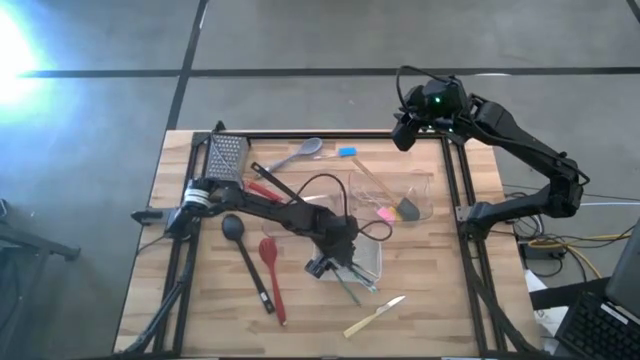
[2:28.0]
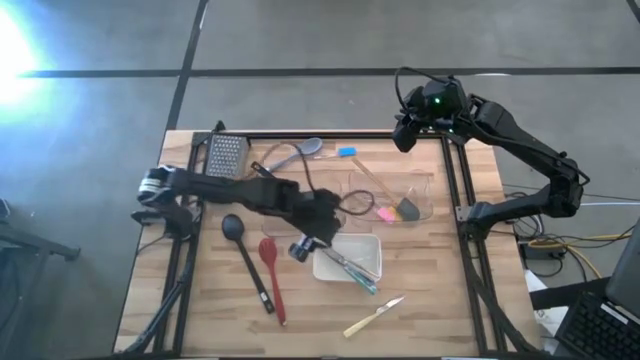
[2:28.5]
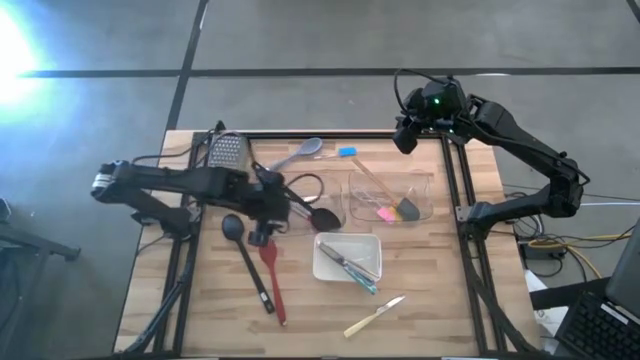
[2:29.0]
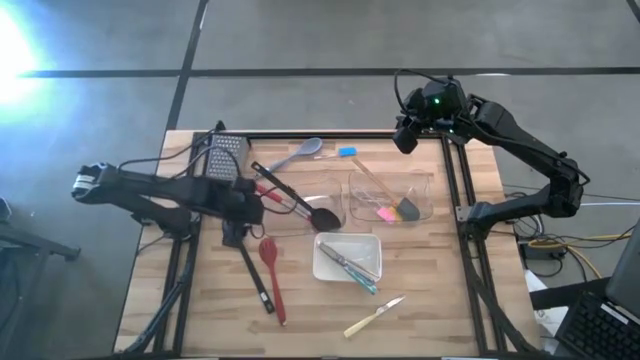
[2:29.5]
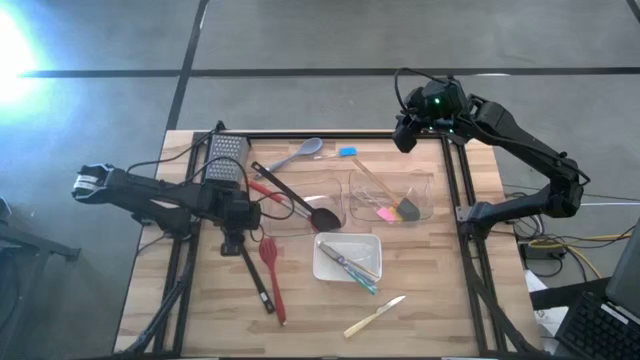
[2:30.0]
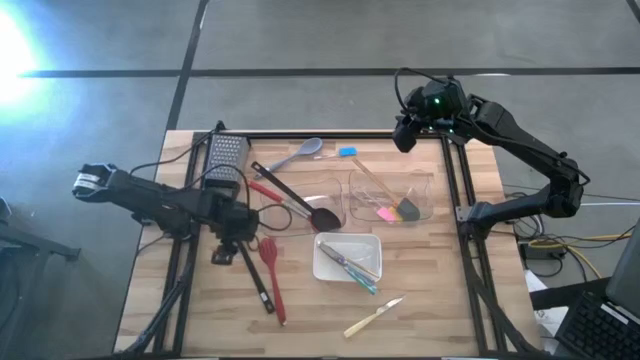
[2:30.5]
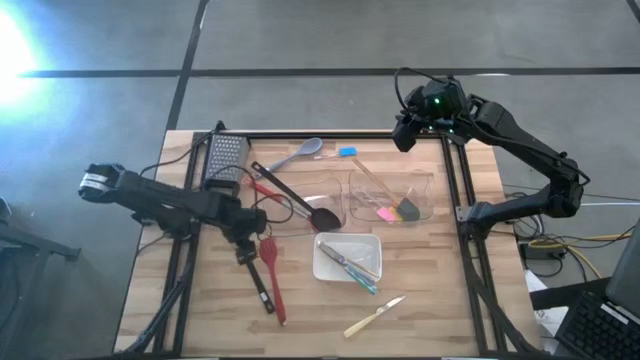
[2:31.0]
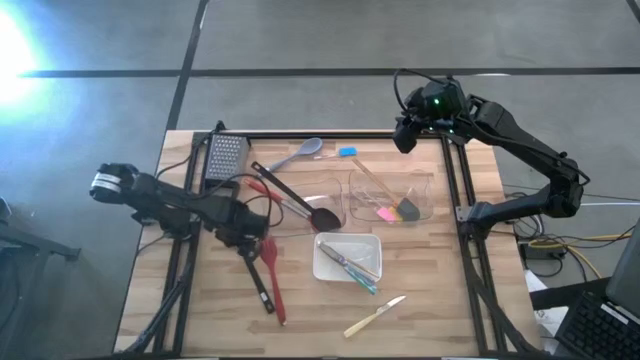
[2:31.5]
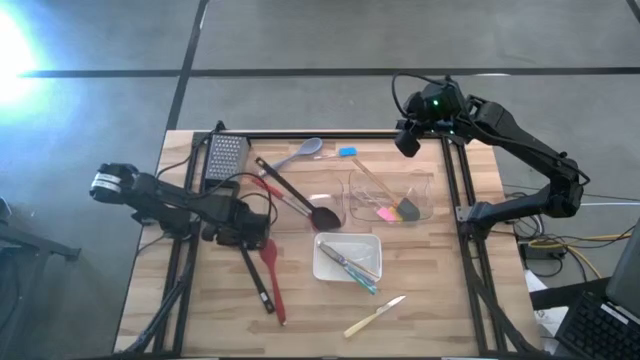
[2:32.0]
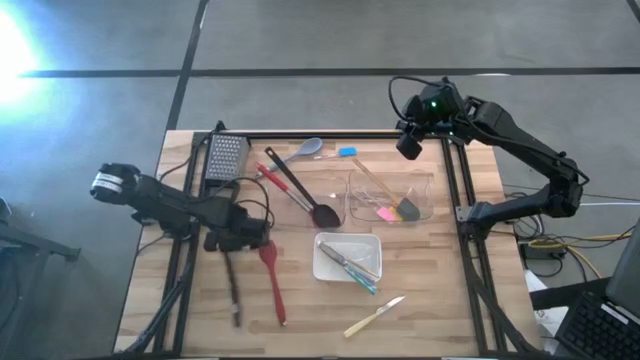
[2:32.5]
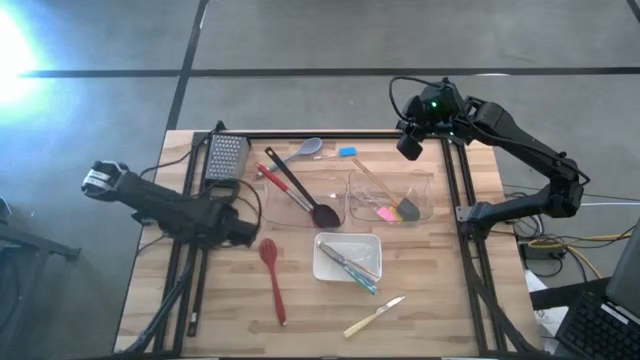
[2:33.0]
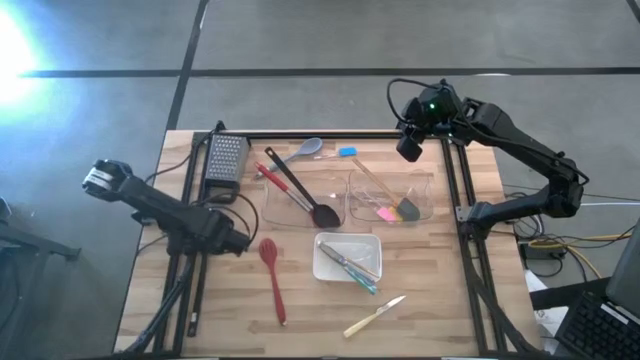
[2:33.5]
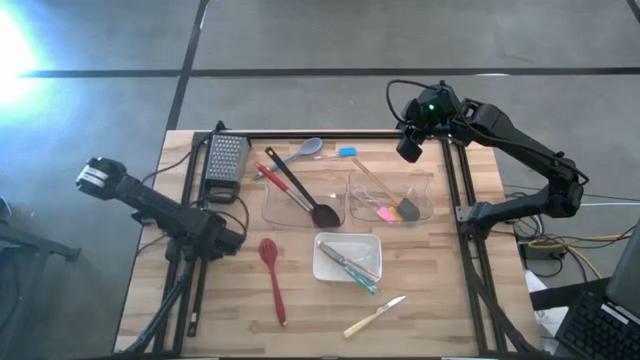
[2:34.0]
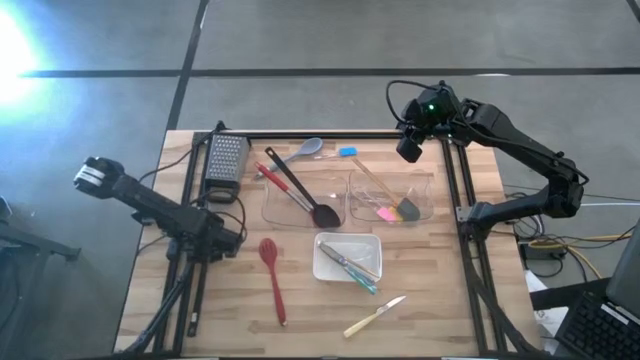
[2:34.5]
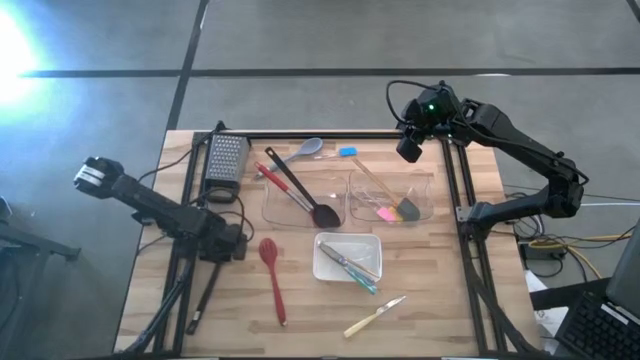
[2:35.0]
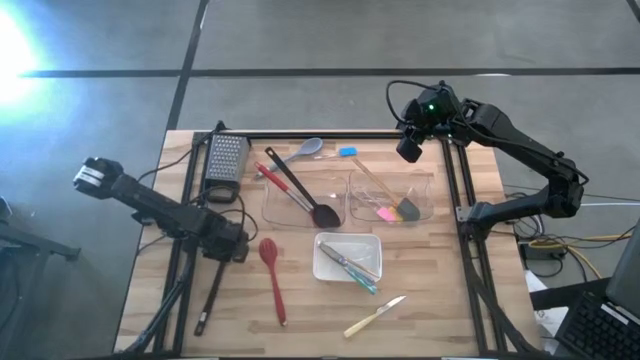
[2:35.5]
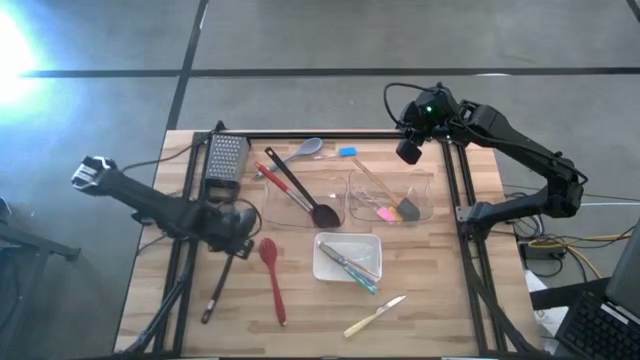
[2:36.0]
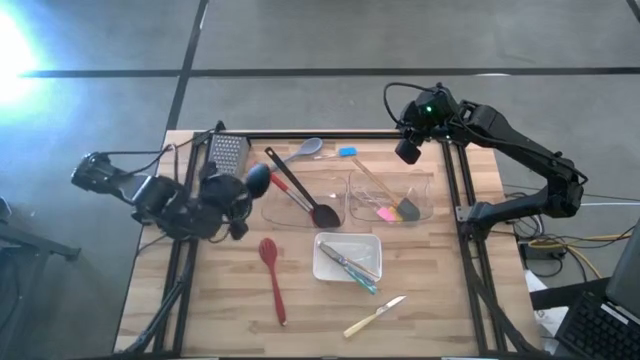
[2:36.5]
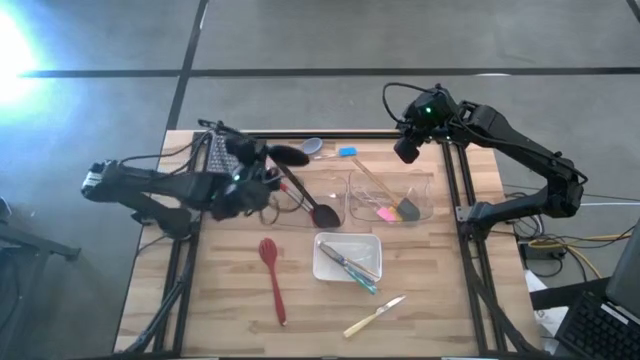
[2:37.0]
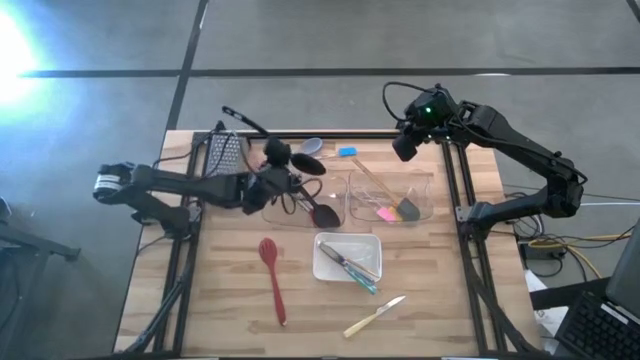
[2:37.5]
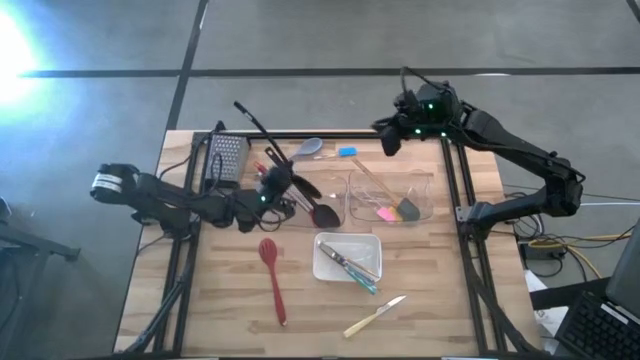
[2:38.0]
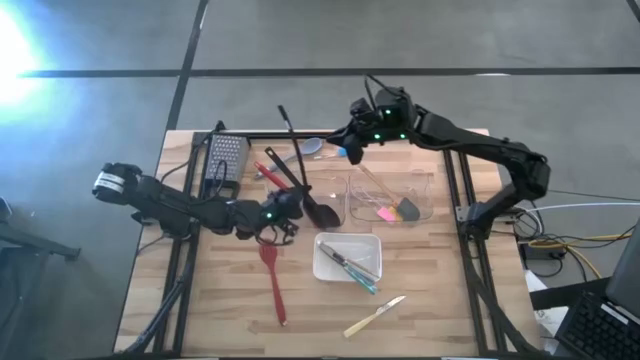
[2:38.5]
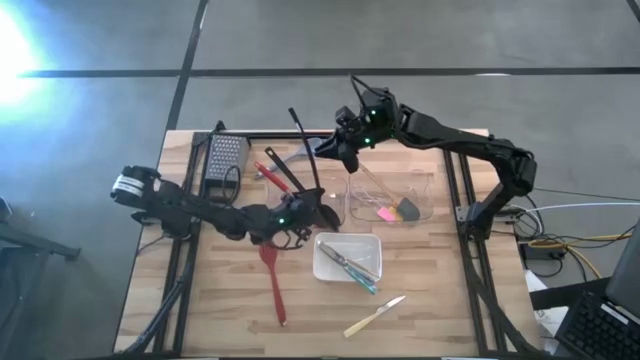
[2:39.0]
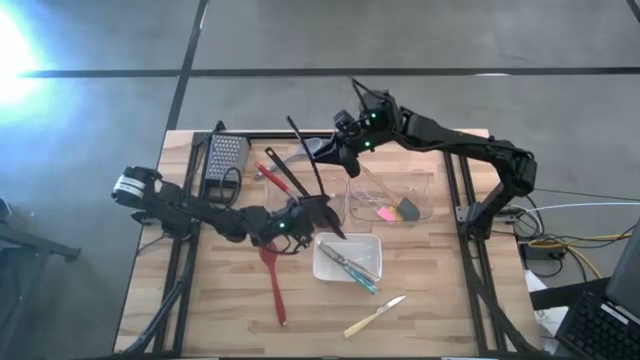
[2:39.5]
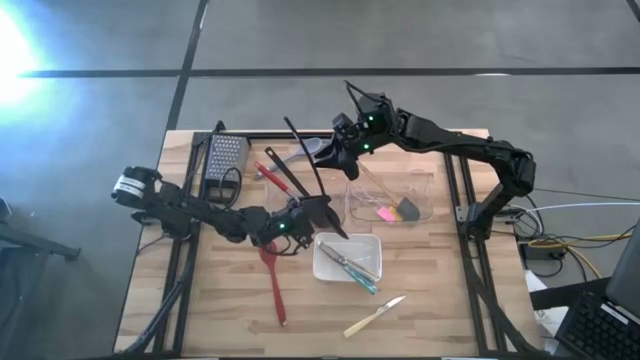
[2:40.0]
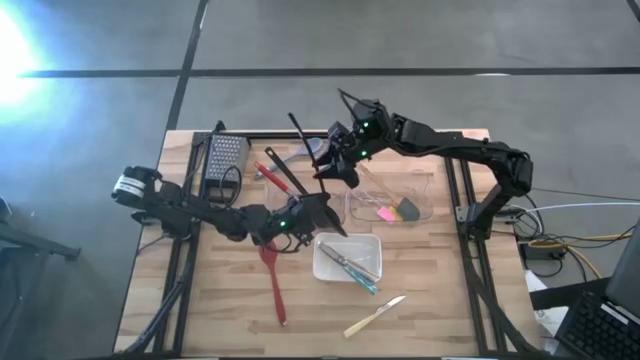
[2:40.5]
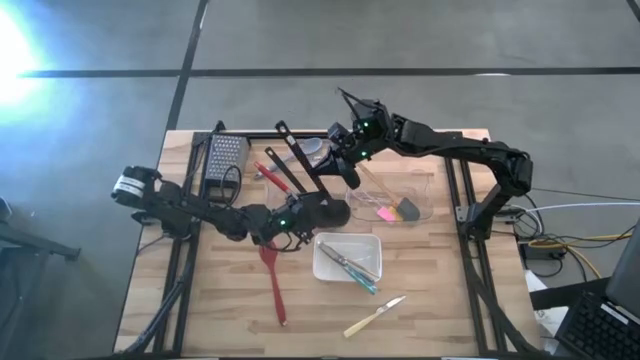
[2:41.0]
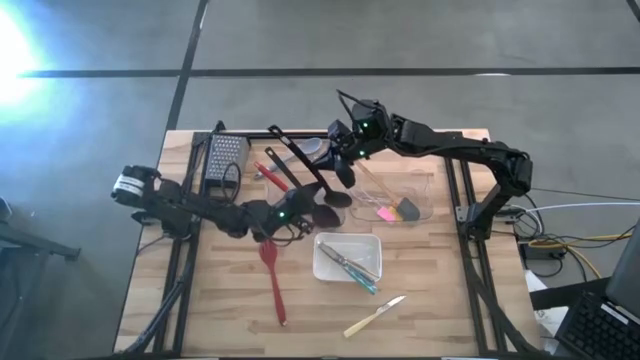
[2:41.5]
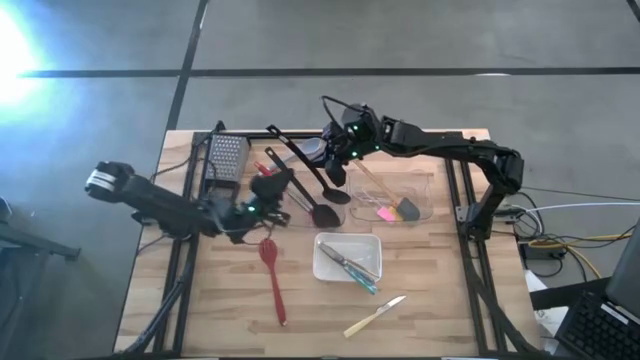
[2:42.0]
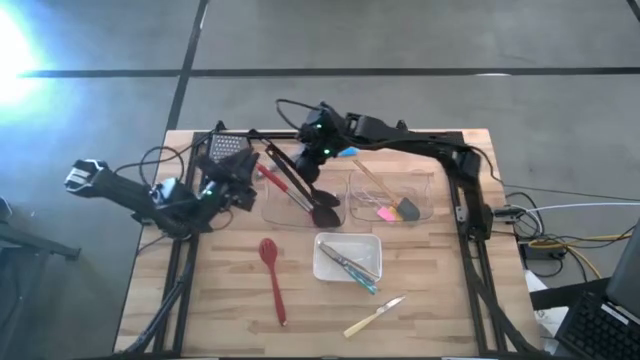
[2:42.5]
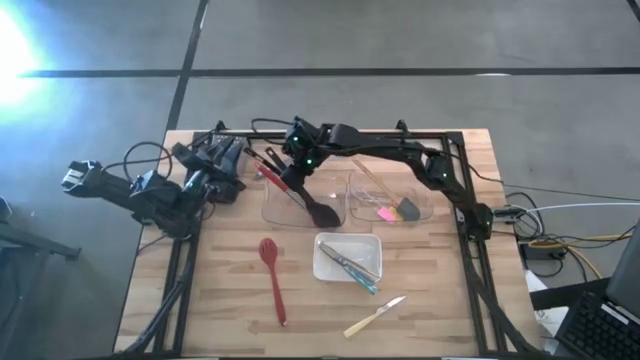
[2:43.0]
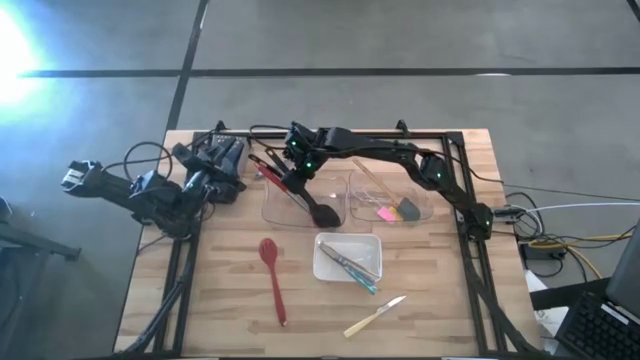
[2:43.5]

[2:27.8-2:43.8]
Task: Pick & Place Kitchen Items
Put the black serving spoon into the left transparent bin

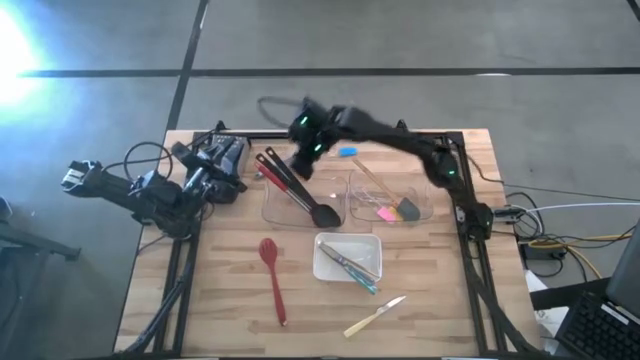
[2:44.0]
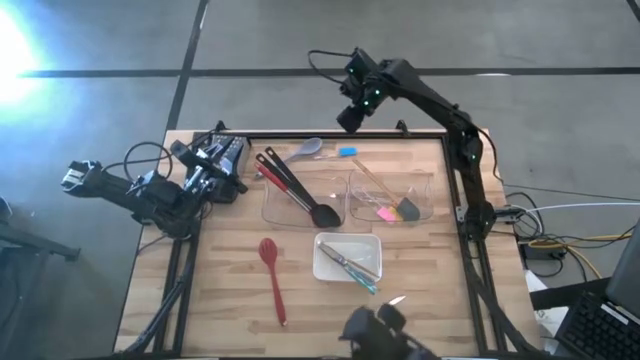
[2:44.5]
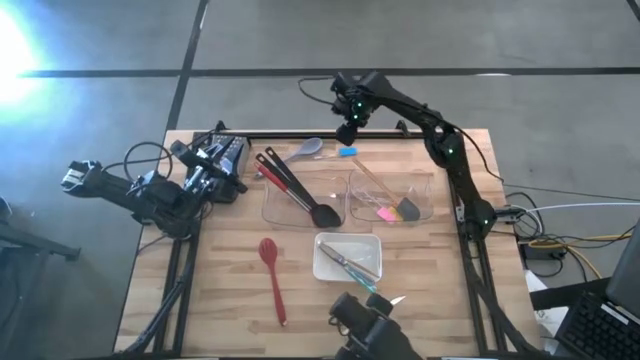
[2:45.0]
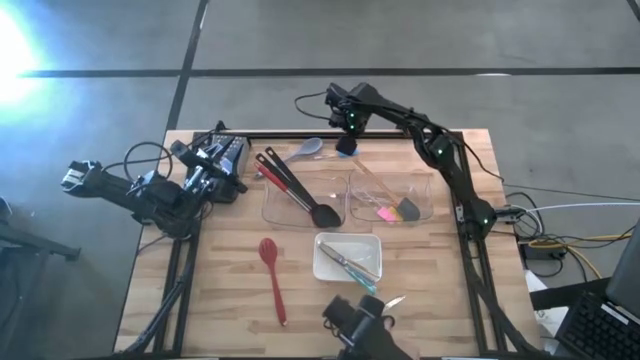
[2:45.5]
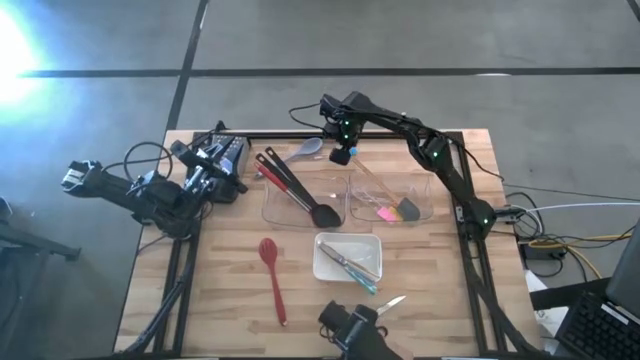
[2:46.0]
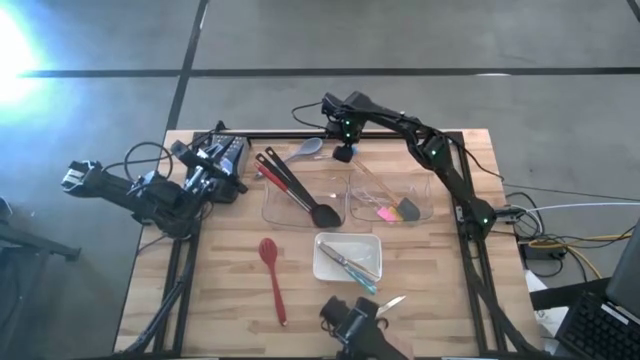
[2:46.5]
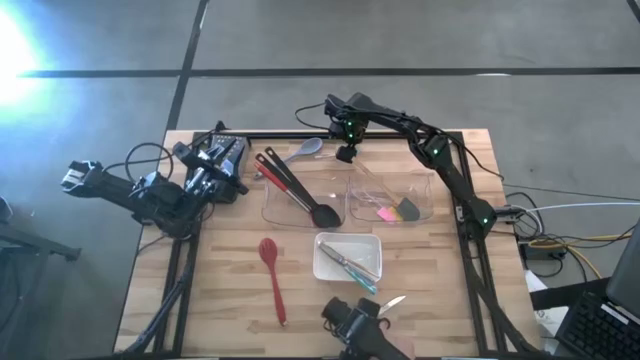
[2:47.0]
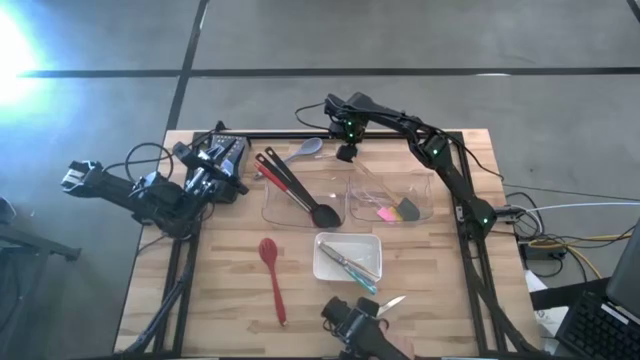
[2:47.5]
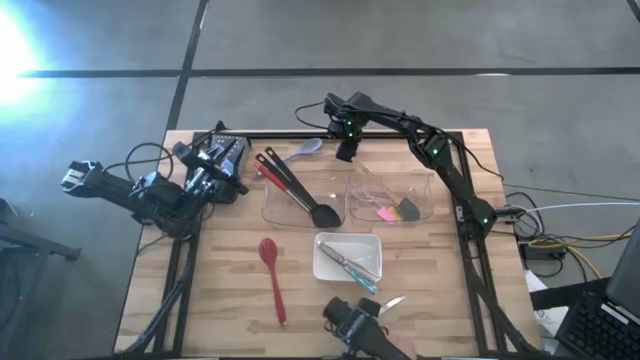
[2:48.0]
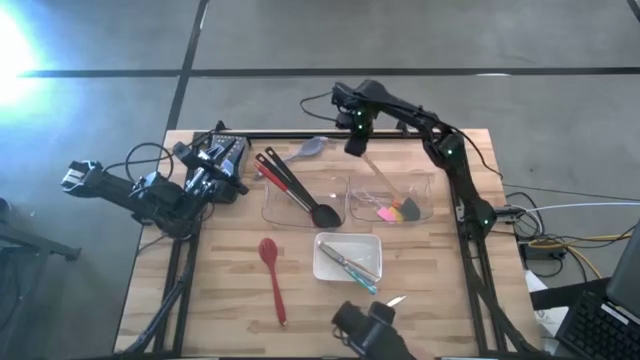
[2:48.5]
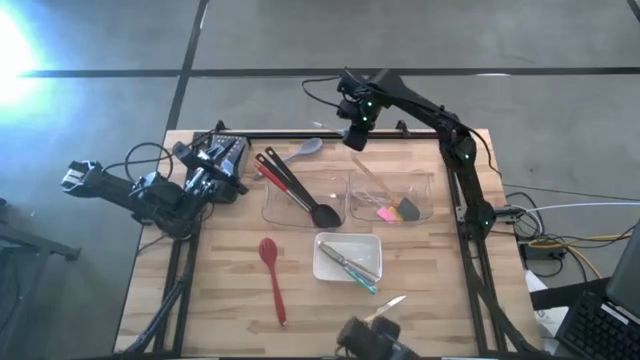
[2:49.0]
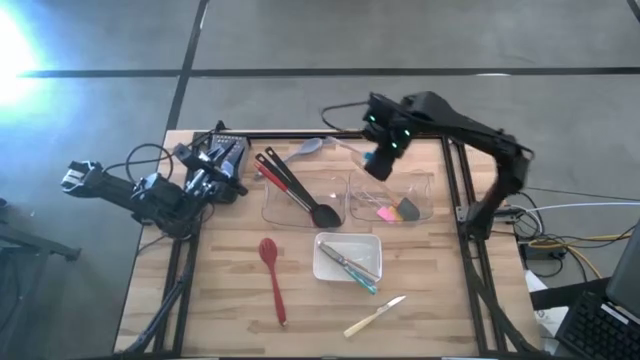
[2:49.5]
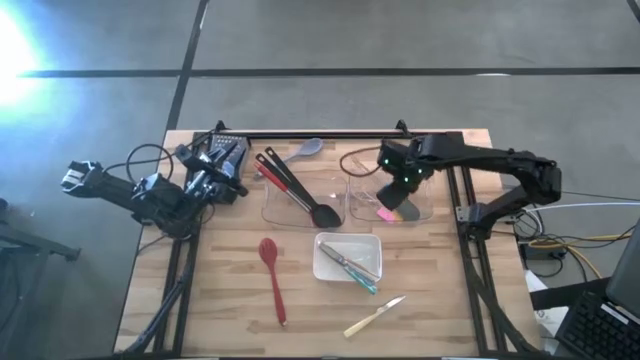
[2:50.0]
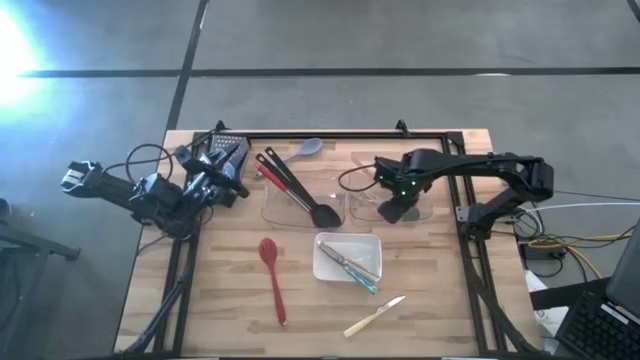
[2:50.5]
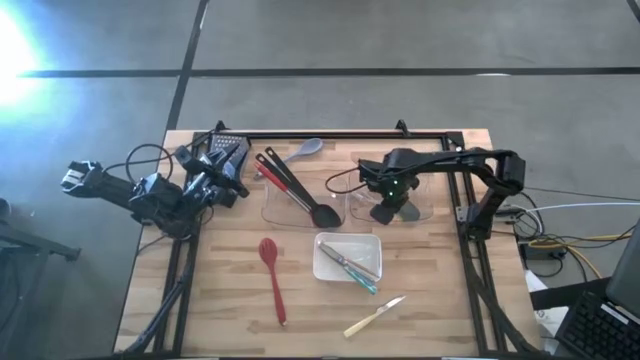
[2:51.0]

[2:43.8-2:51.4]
Put the blue spatula into the right transparent bin
